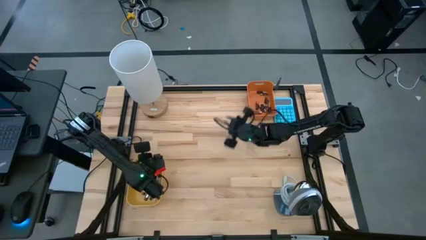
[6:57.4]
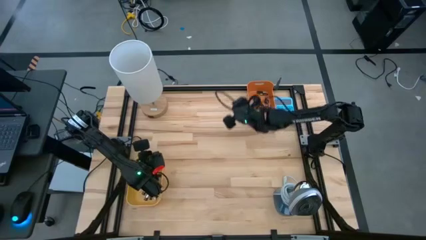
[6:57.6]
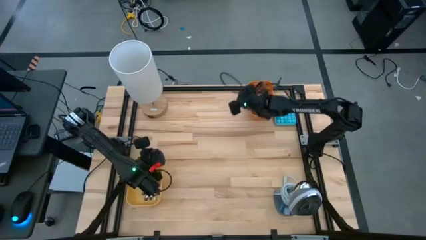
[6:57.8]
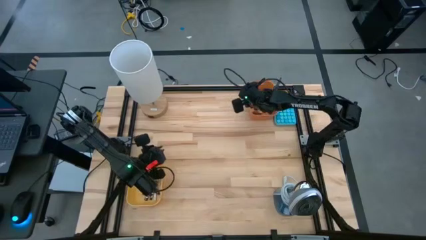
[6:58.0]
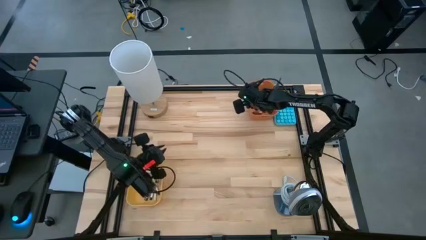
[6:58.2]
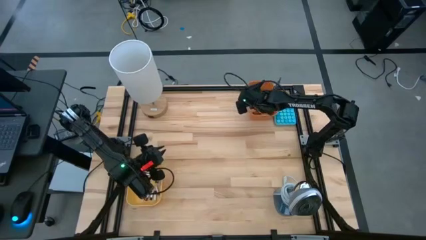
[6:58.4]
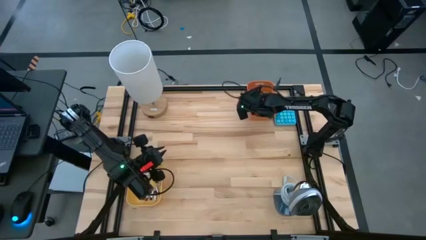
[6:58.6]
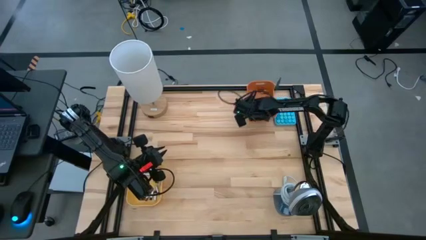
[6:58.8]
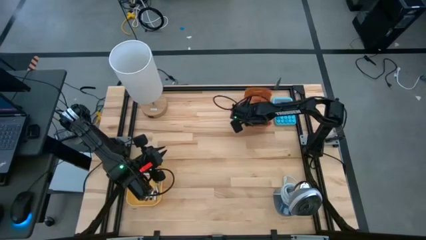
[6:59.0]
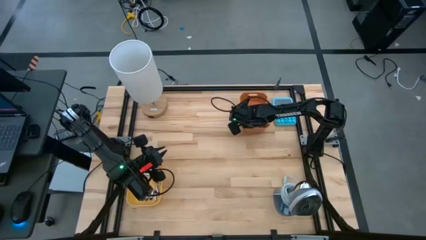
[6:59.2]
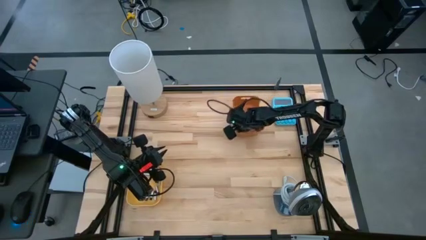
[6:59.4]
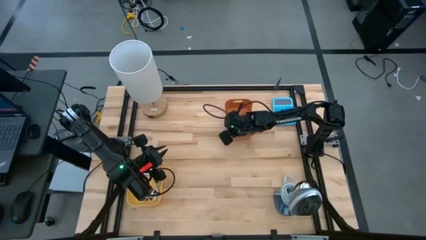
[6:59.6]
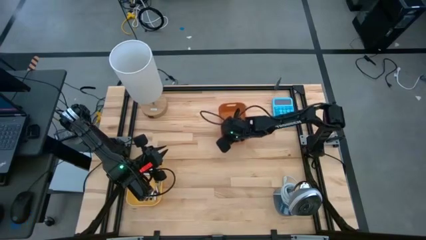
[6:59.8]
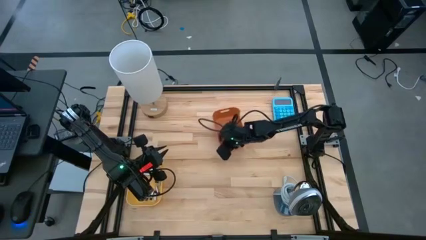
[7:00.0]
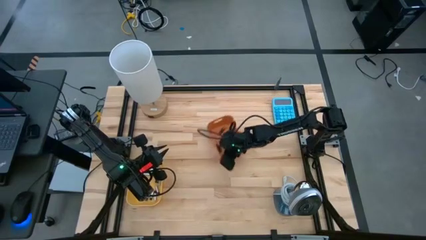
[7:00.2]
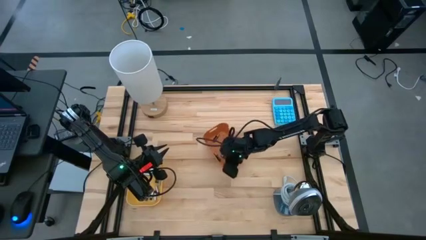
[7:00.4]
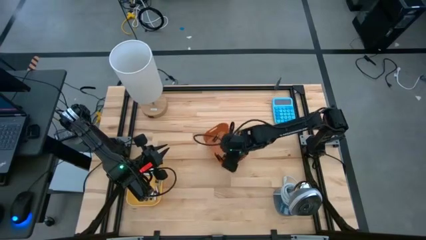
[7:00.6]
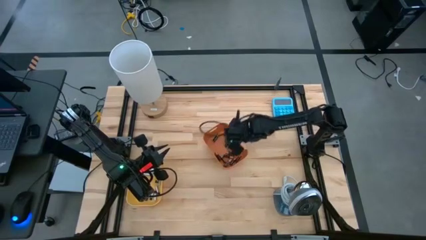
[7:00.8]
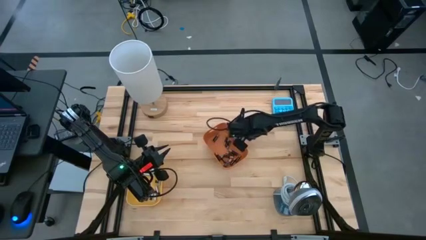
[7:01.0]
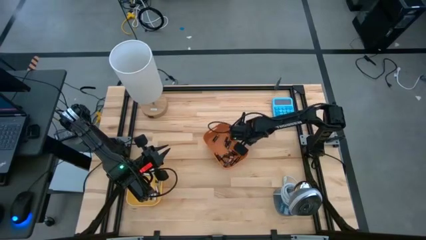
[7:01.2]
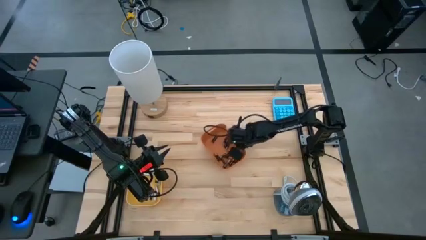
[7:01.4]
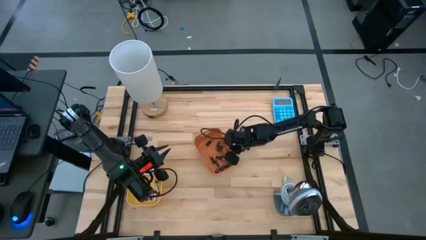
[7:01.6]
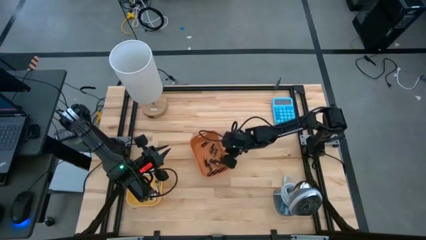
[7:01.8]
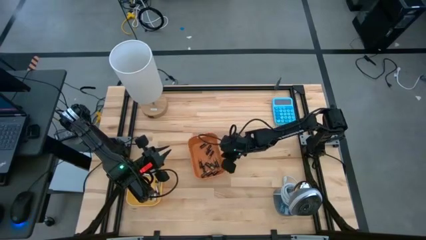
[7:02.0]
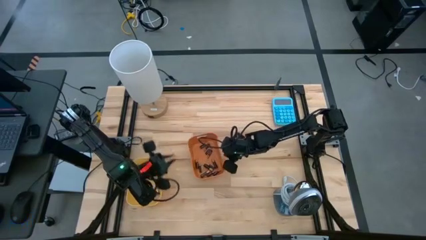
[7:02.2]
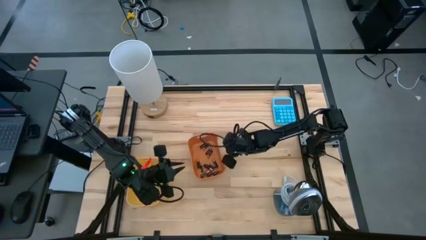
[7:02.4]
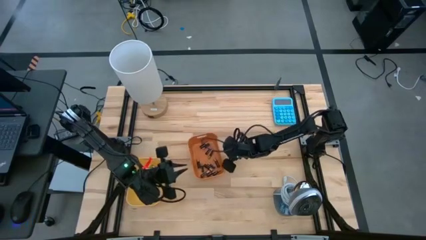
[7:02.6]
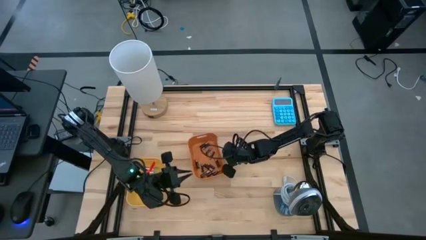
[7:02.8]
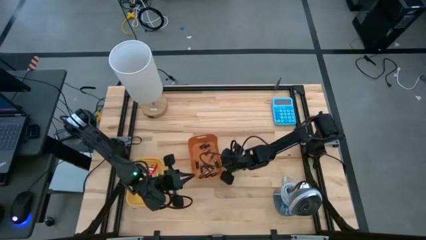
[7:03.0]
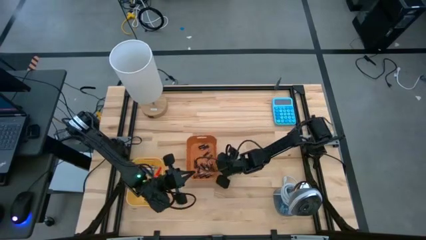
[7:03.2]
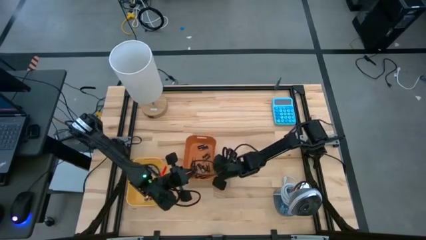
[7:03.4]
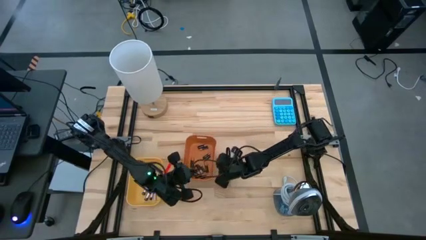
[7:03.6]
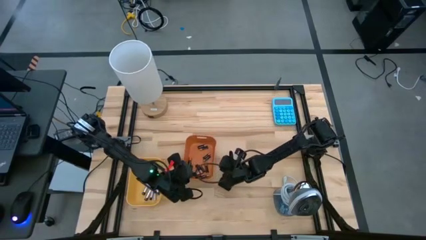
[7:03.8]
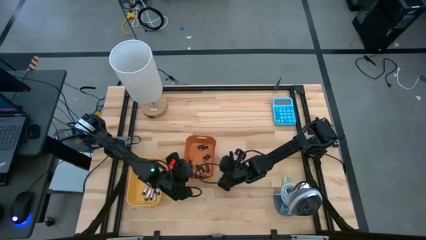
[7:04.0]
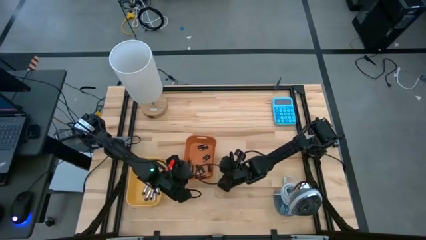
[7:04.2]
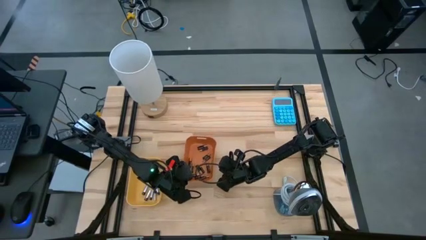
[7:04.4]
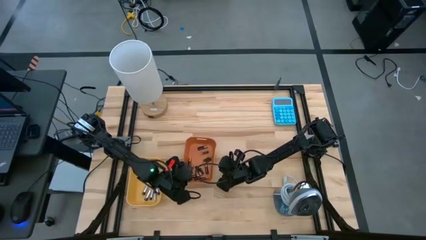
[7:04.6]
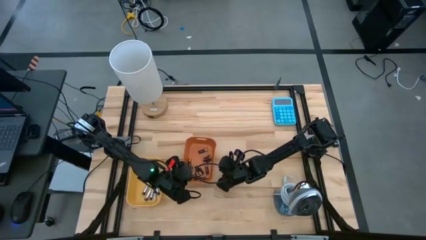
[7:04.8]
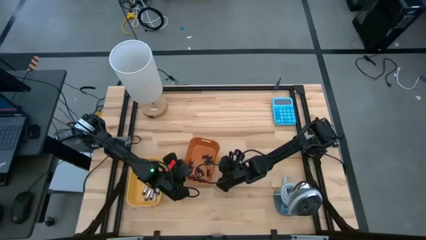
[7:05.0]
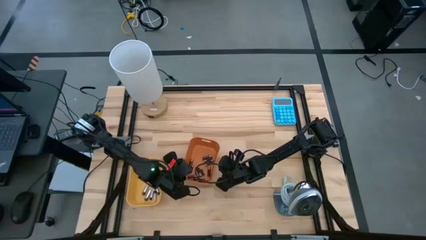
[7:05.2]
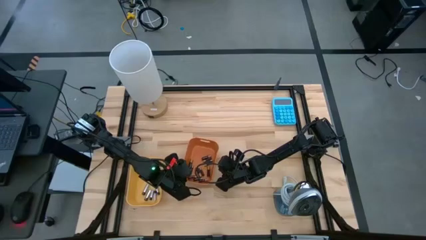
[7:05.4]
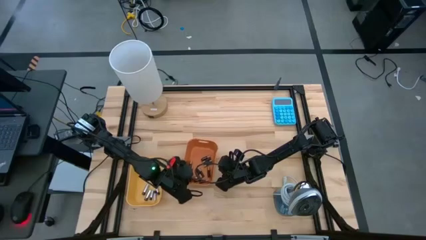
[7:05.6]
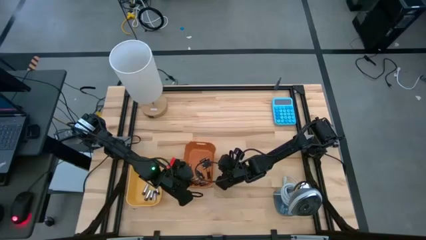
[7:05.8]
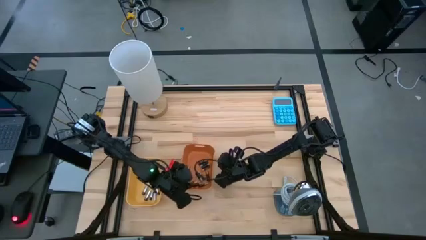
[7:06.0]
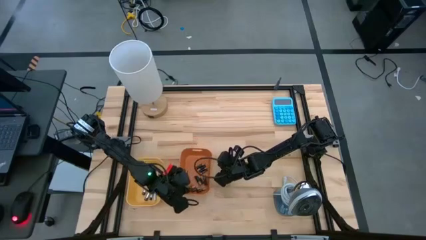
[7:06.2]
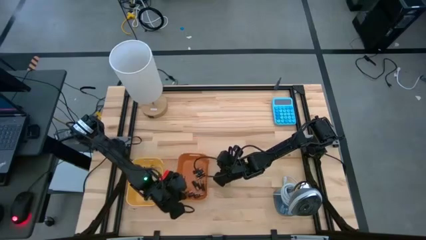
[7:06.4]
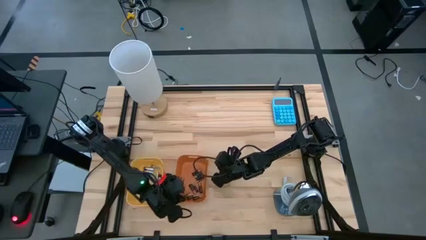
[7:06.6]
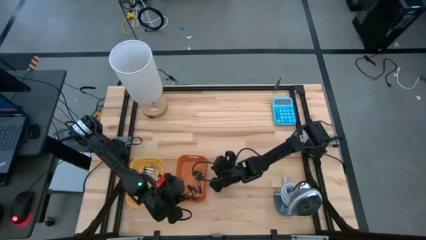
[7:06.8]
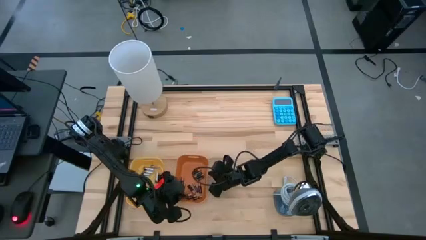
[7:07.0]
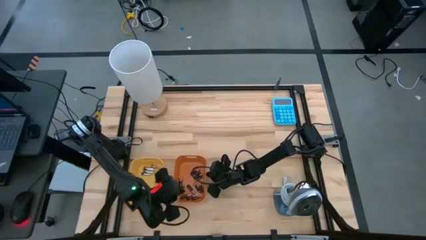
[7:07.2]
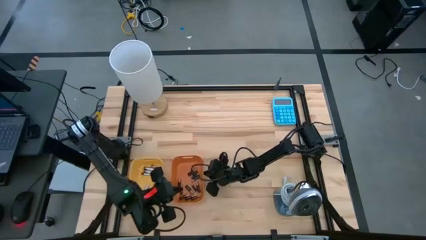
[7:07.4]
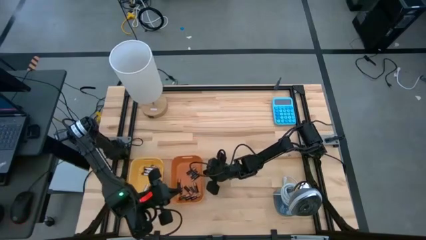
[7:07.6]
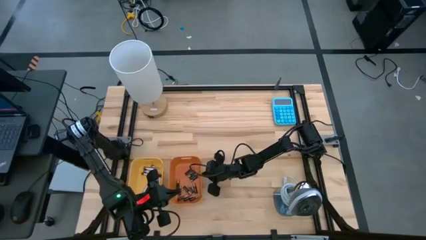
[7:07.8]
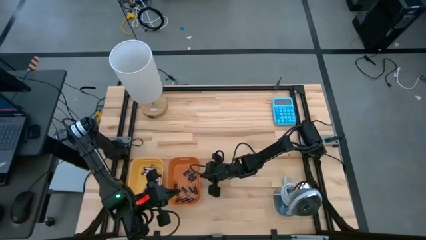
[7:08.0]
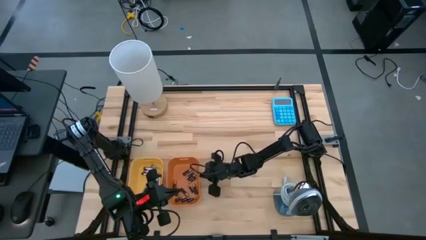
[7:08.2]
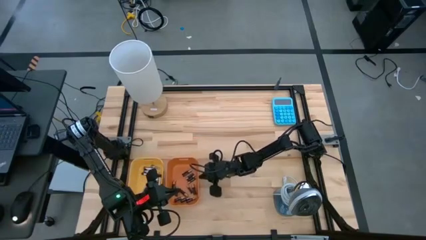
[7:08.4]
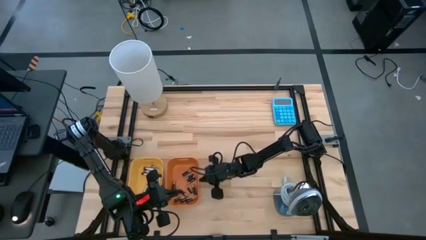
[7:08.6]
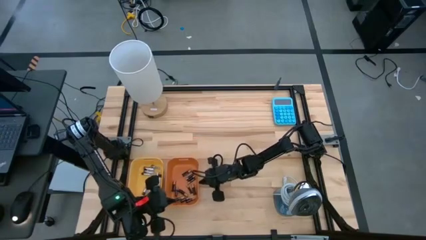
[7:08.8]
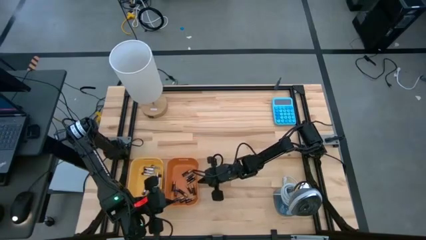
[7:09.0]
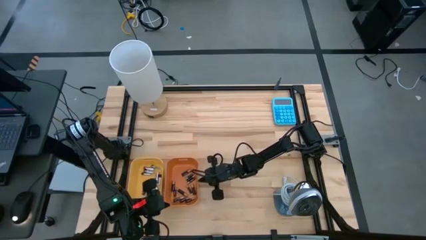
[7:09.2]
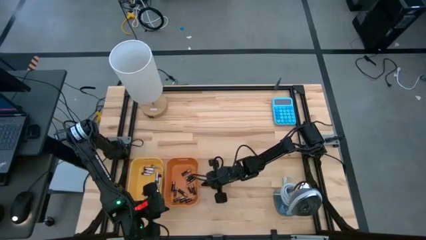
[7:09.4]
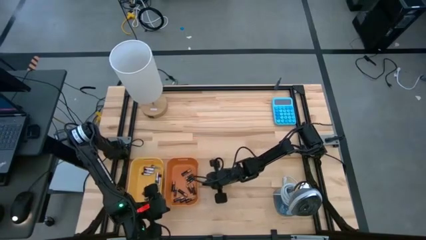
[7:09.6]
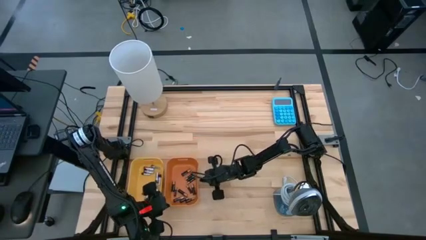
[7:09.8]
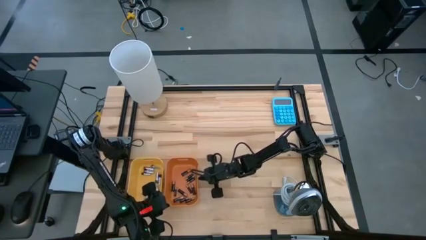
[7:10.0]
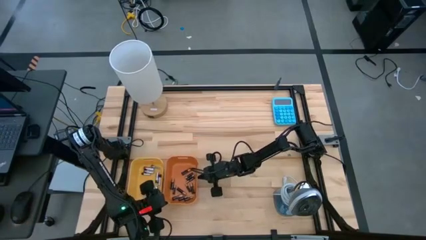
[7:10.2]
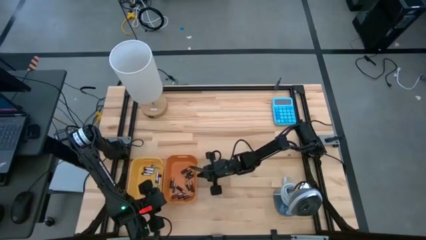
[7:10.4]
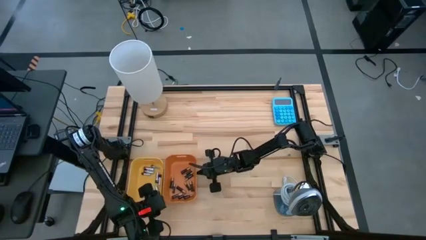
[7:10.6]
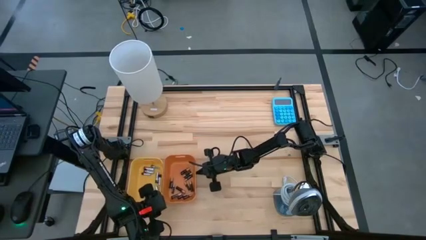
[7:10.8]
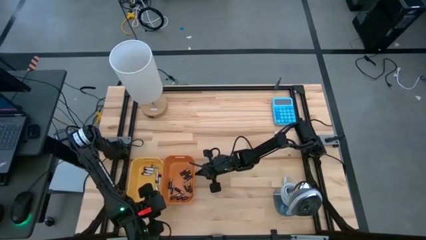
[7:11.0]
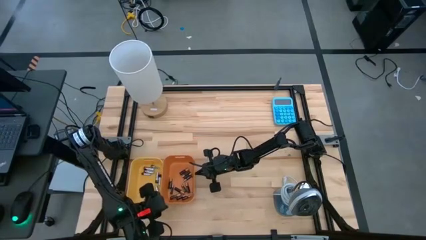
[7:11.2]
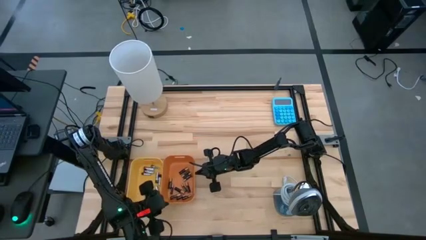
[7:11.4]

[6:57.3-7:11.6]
Task: Sort batteries
Move the orange bin to the right side of the yellow bin
